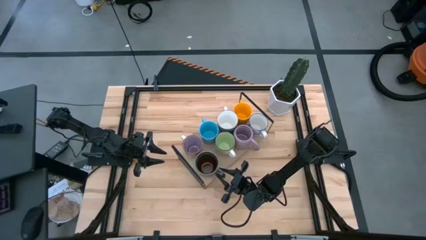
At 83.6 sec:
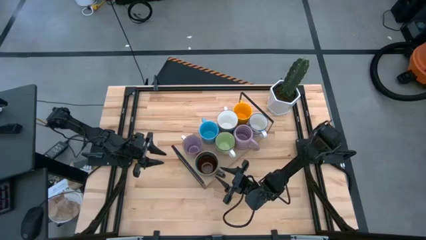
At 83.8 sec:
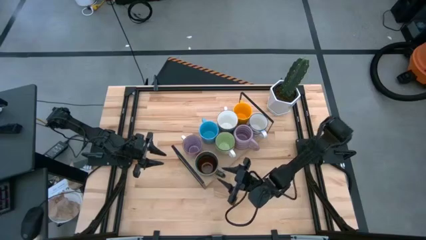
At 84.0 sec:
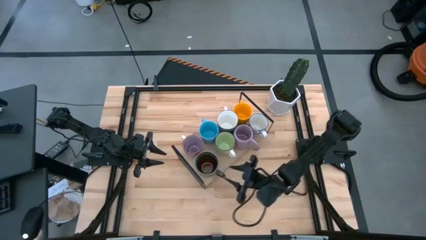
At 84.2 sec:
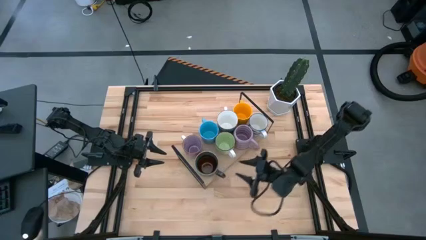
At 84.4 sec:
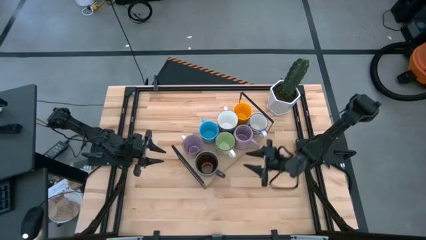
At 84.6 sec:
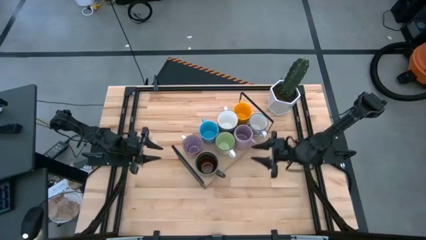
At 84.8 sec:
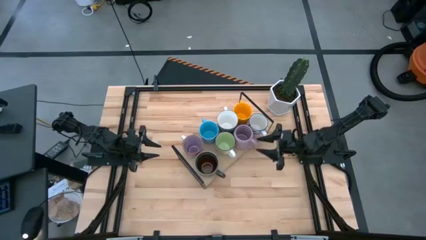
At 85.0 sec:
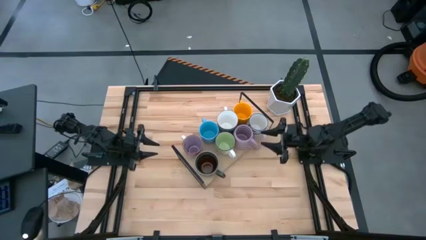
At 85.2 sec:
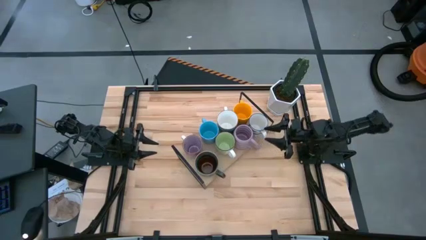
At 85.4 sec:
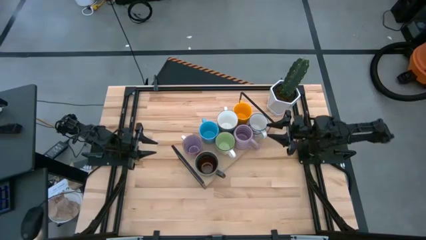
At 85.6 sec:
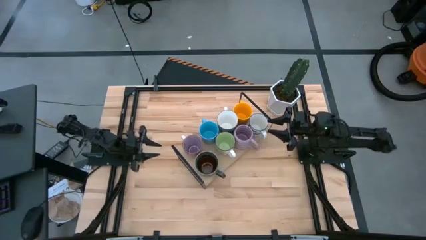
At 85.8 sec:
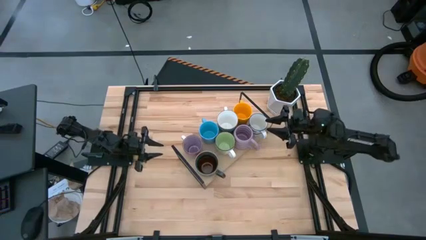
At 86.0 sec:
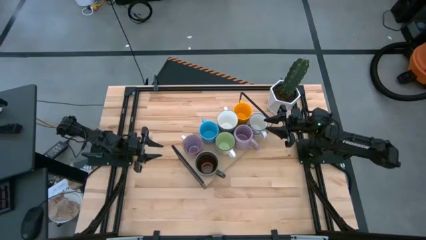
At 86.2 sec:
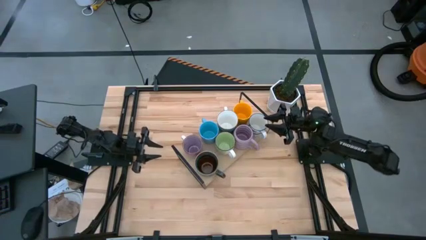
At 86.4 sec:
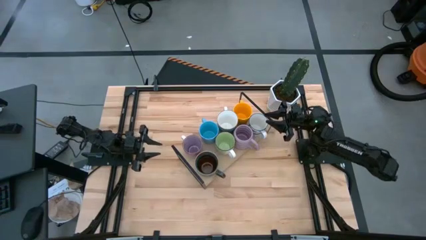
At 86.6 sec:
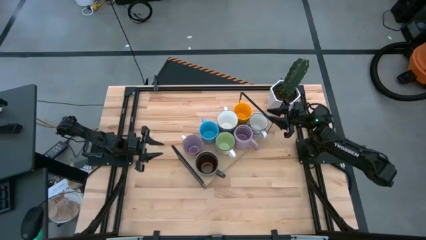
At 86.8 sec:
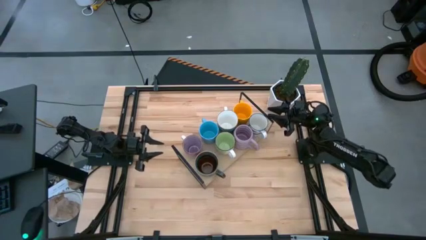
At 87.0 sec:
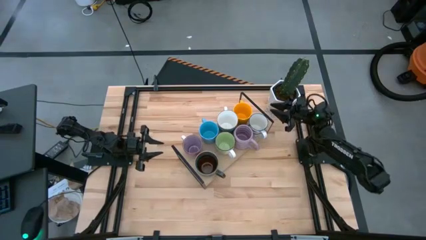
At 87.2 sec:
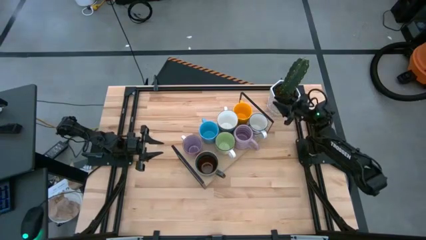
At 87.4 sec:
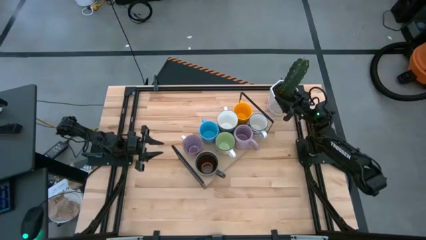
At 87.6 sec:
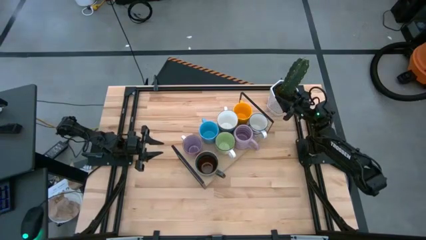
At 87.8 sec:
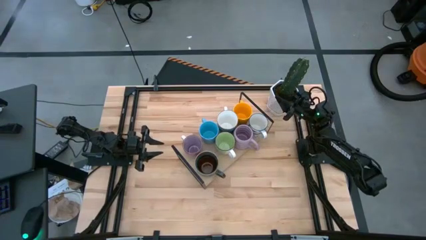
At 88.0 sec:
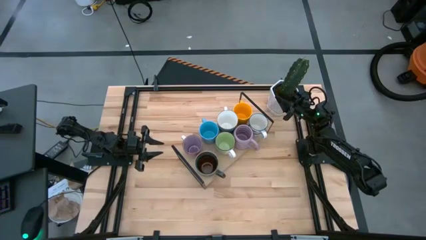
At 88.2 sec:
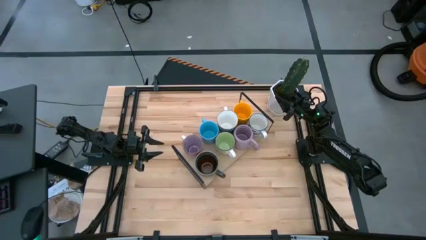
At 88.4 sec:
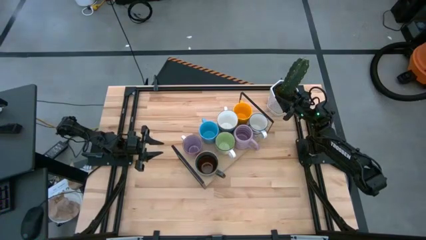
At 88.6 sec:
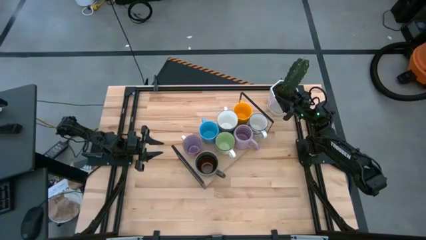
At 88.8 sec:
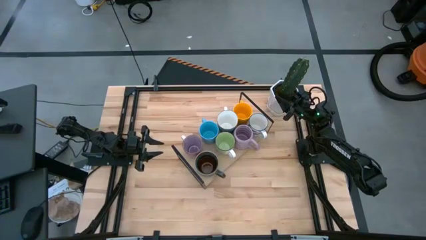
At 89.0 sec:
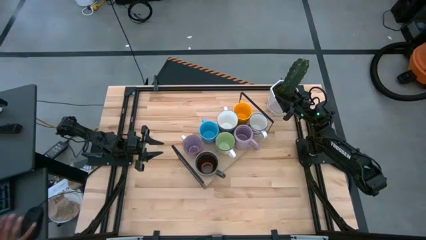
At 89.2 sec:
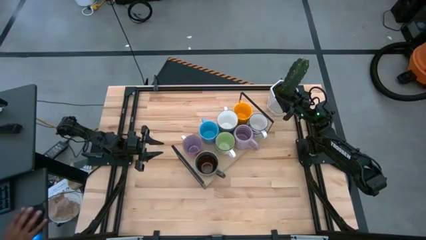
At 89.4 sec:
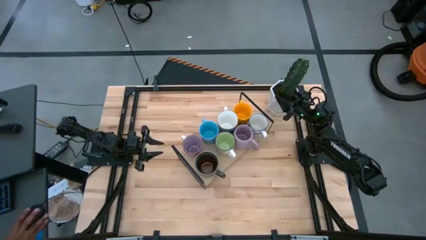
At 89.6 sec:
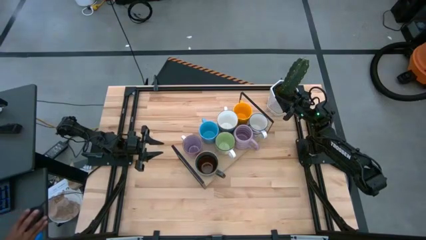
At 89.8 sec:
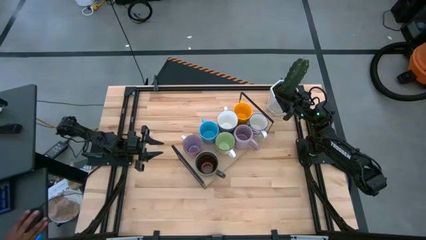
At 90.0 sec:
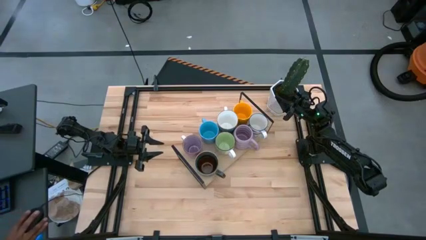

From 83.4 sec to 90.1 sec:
Task: Place coffee mugs
Return to Home Position

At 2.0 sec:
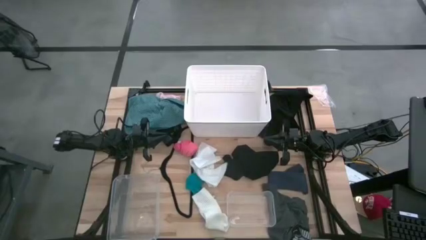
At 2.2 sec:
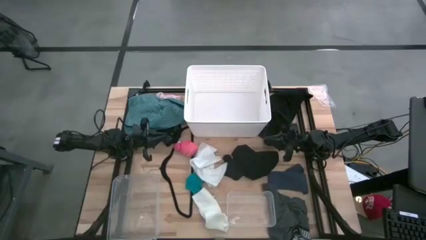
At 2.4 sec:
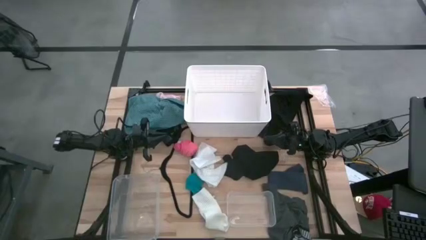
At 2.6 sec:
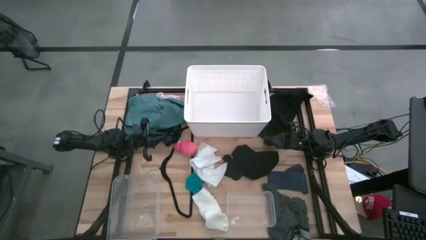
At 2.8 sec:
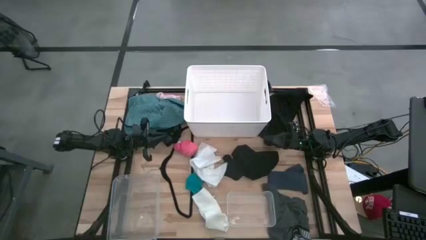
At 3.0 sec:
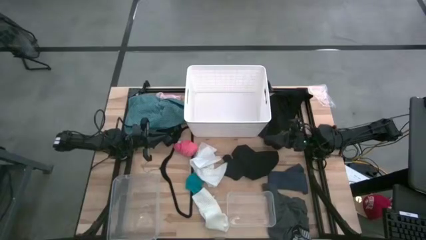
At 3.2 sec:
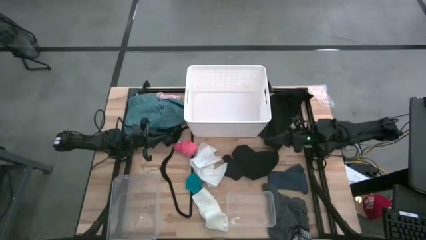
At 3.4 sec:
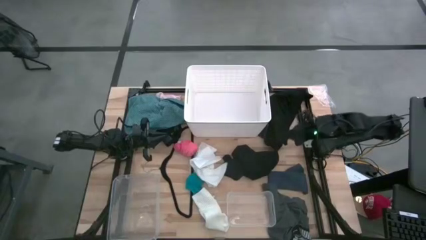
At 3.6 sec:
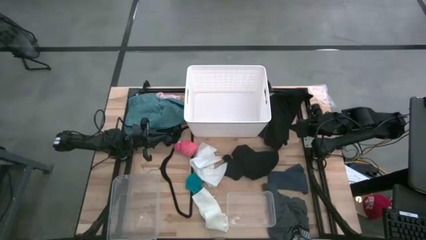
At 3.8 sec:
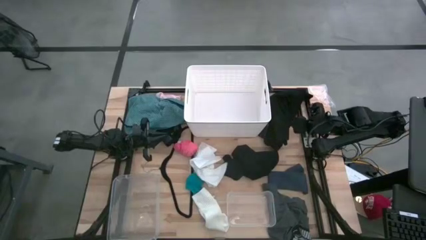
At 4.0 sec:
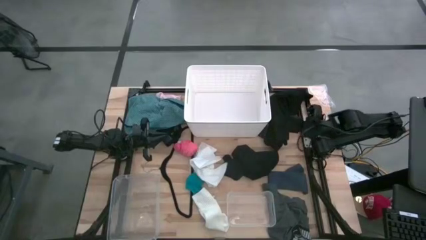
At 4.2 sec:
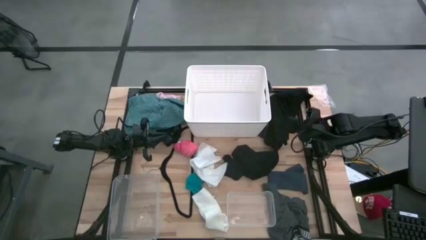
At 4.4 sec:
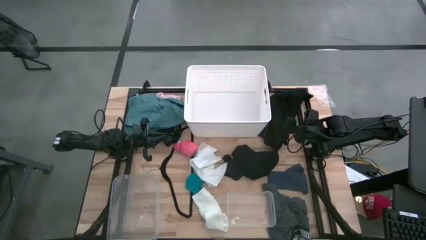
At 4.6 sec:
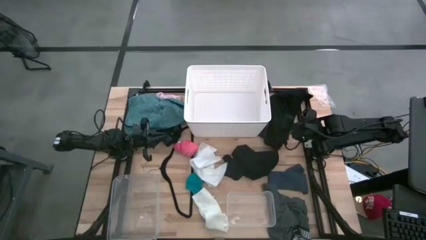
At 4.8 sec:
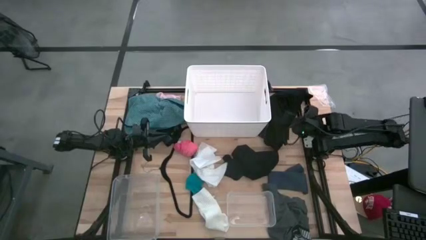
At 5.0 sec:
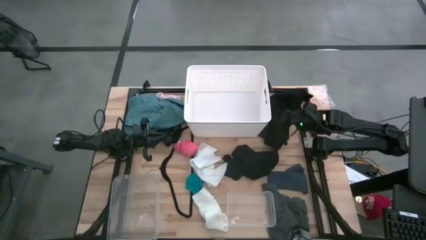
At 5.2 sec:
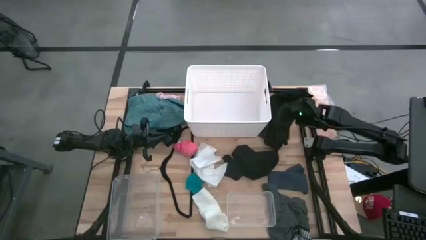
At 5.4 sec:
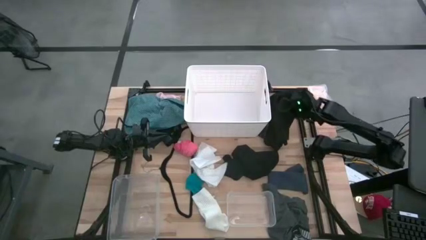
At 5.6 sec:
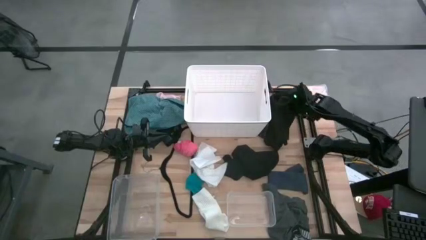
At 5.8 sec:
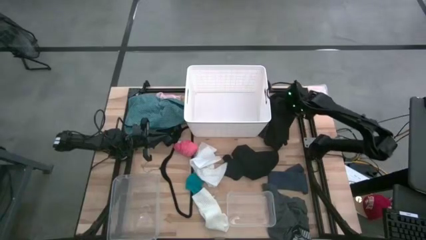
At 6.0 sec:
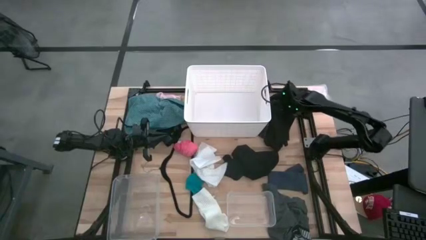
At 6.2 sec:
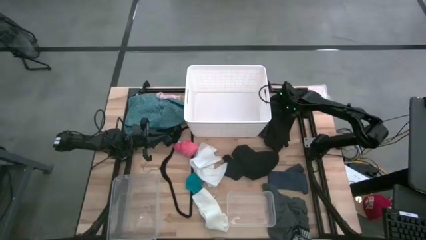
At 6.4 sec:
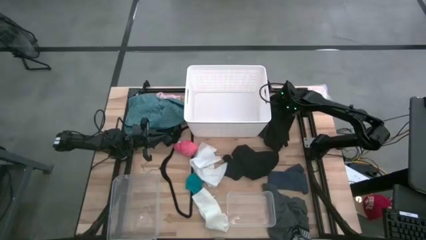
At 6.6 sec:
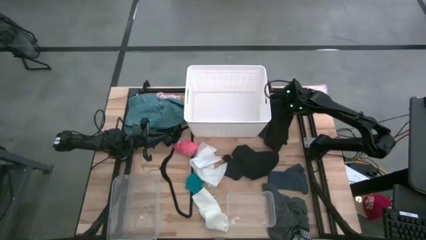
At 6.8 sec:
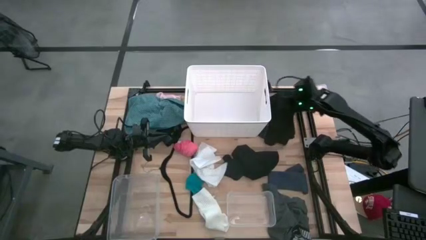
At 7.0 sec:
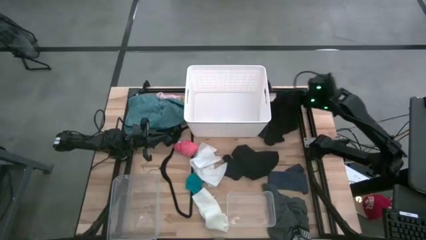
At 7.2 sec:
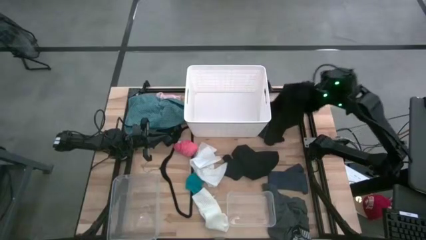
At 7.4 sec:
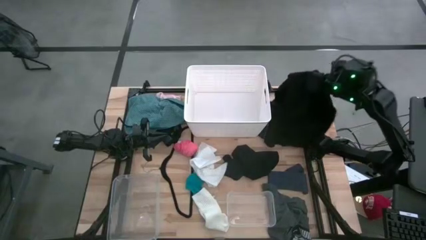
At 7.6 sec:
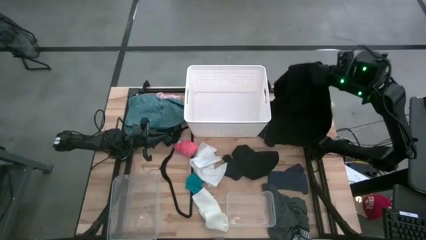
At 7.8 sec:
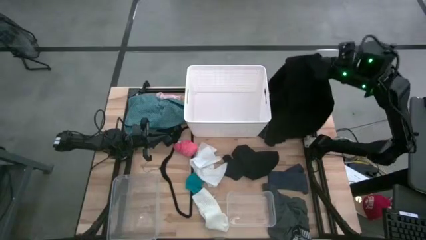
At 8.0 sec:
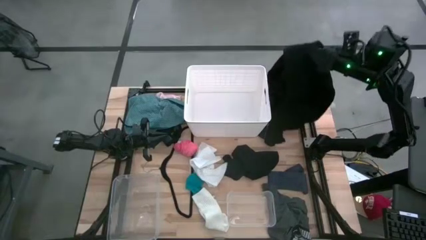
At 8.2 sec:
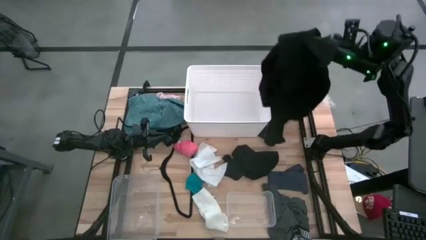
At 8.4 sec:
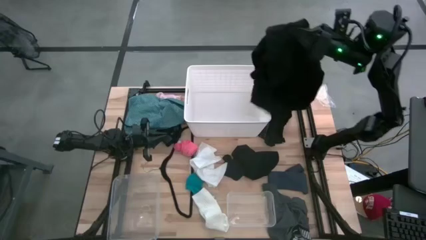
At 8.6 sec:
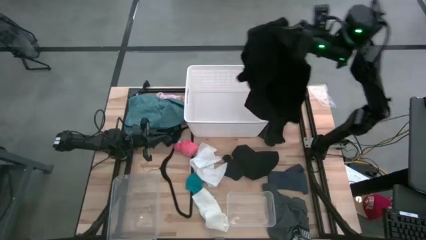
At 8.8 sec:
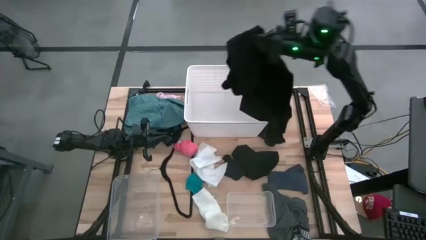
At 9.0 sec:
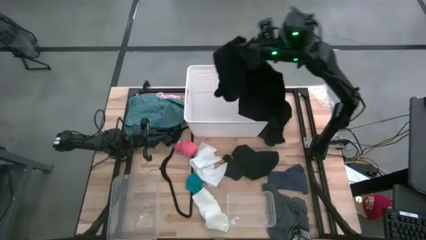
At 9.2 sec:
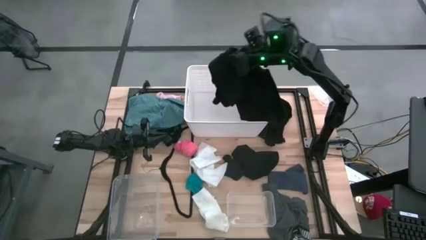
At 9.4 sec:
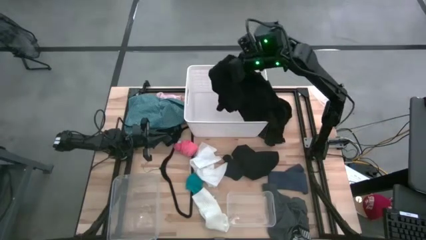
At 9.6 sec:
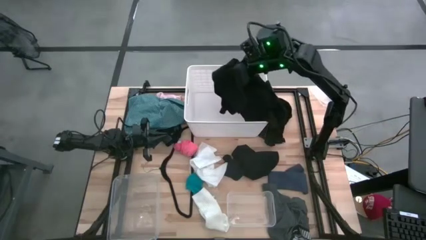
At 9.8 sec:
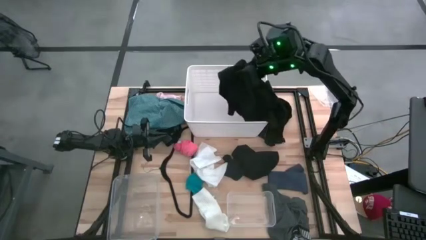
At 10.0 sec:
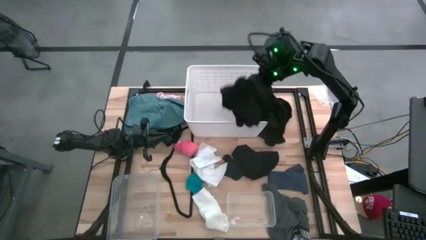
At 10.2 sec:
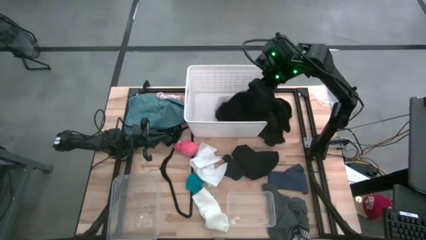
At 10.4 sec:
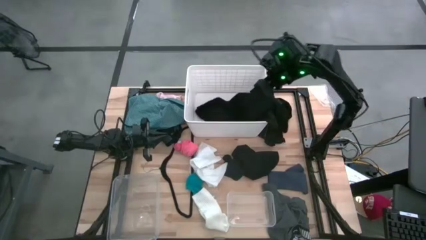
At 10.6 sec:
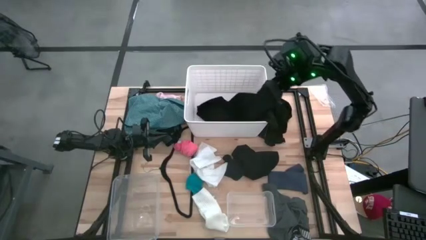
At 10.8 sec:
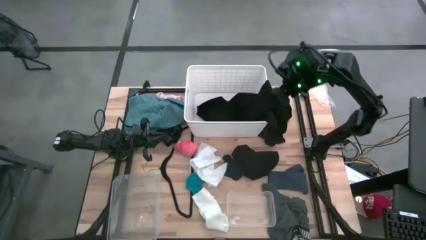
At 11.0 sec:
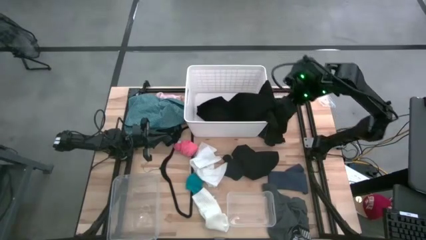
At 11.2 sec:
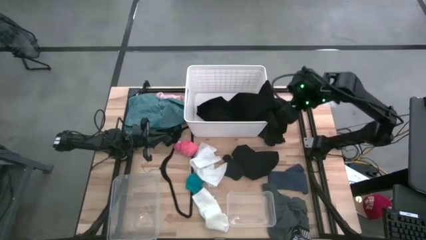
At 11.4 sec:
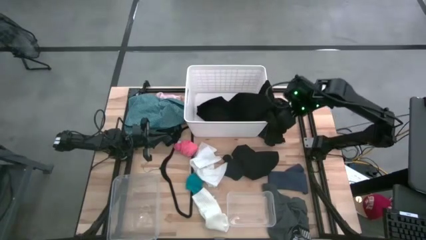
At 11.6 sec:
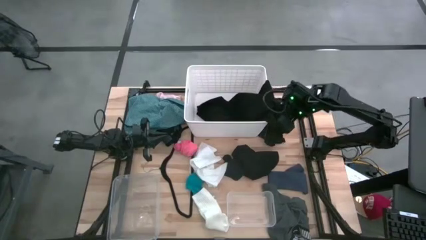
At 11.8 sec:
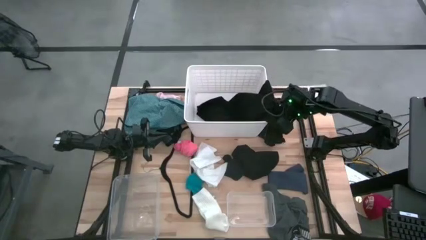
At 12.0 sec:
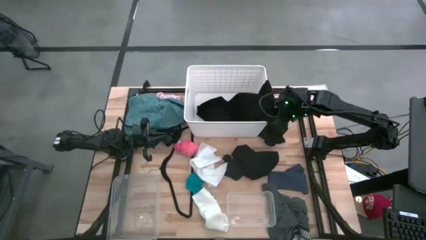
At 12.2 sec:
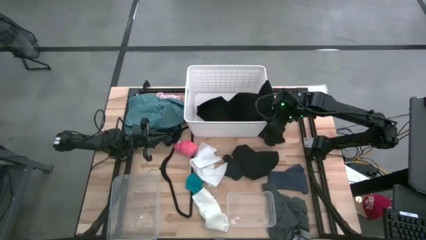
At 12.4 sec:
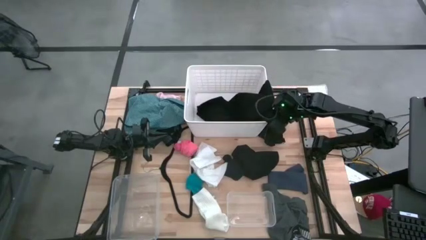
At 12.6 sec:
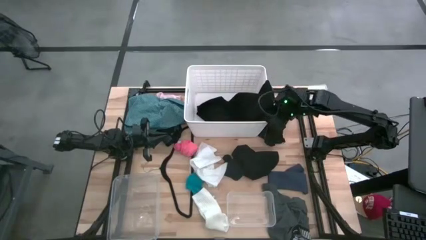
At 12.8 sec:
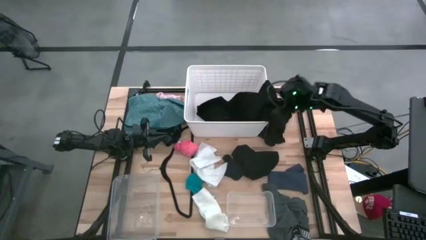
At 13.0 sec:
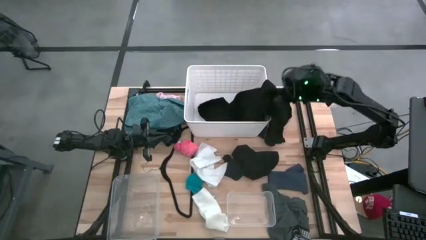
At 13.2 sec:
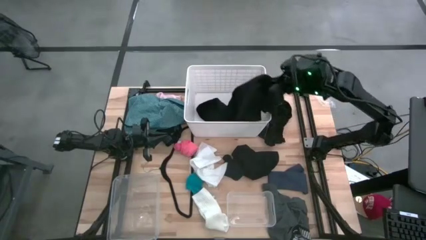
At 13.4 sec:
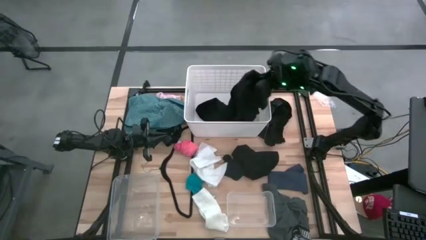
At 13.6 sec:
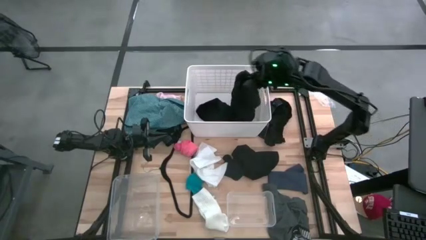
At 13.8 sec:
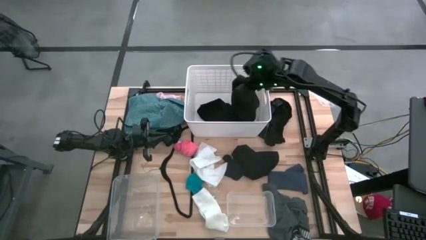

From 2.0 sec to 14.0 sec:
Task: Pick & Place Cloths
Put the black shirt into the laundry bin
